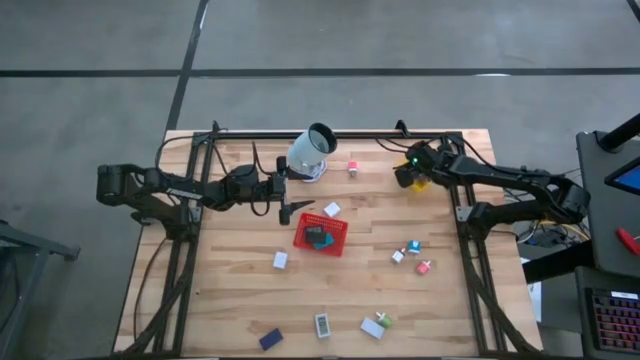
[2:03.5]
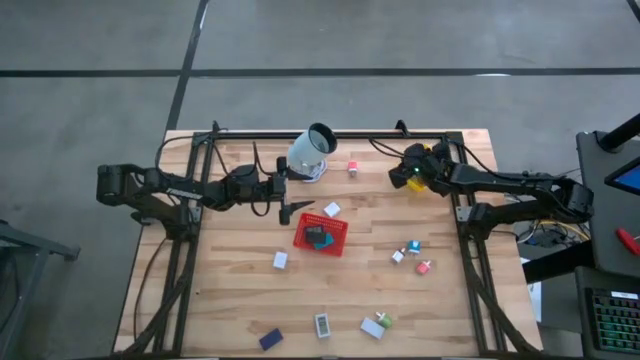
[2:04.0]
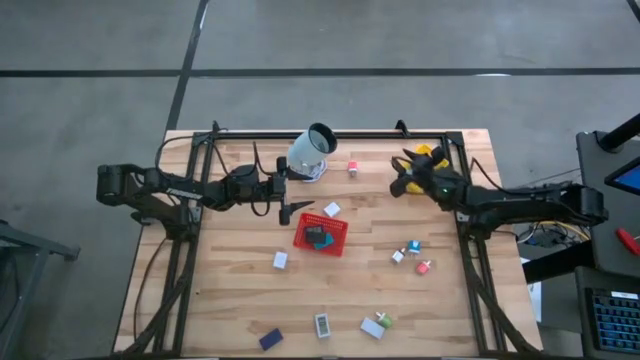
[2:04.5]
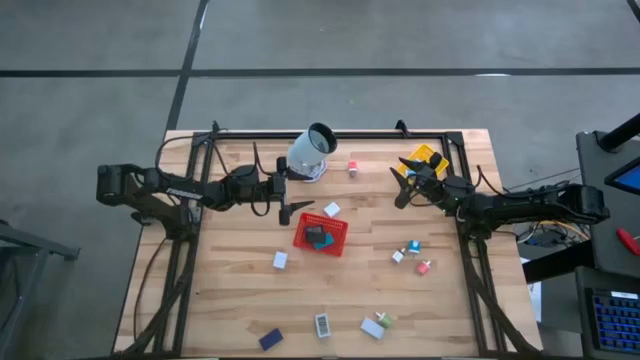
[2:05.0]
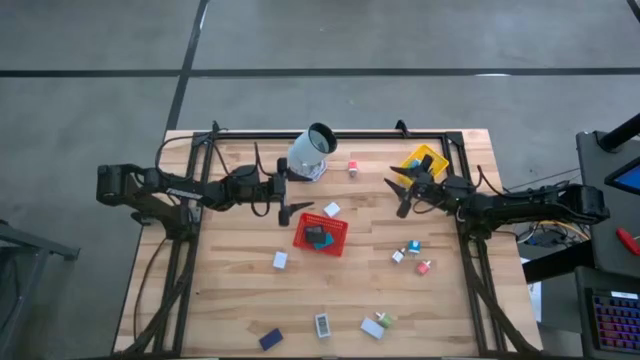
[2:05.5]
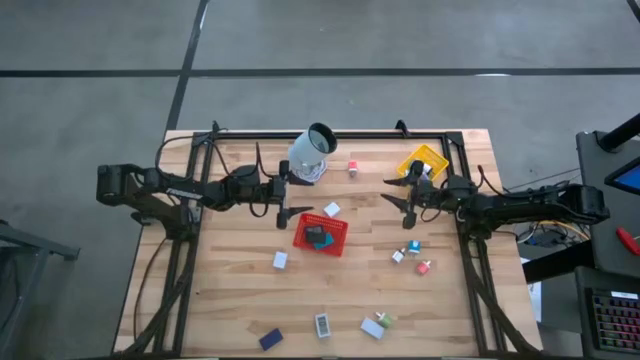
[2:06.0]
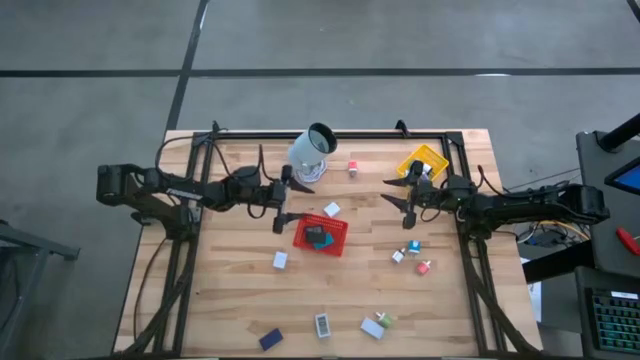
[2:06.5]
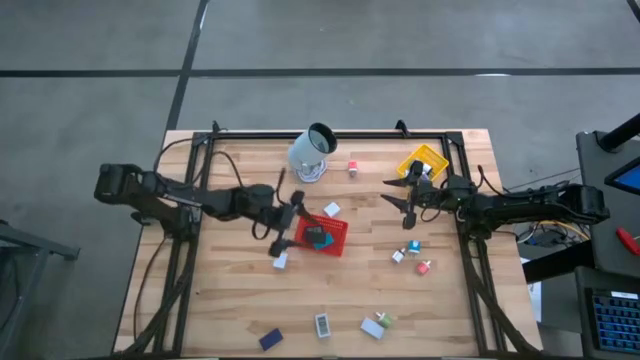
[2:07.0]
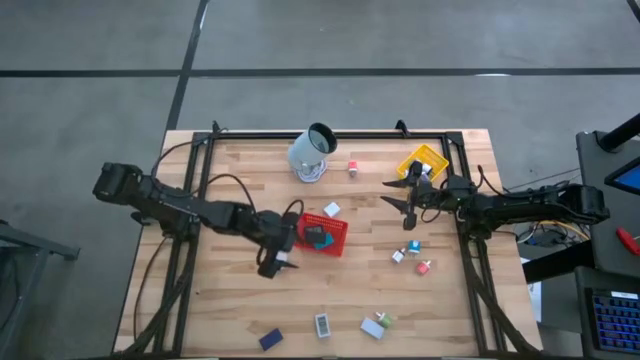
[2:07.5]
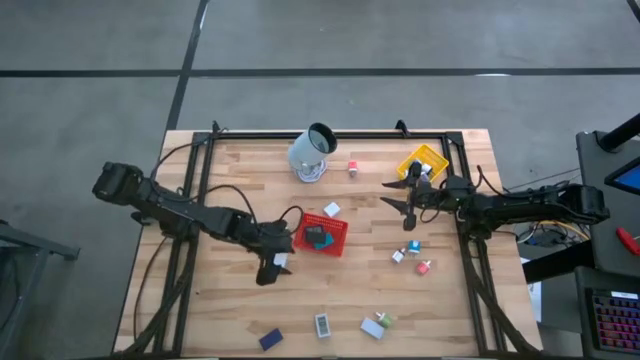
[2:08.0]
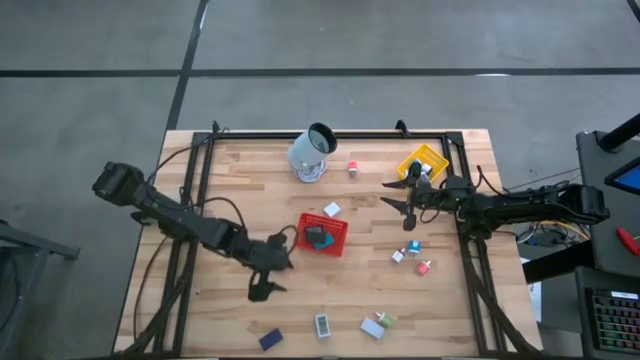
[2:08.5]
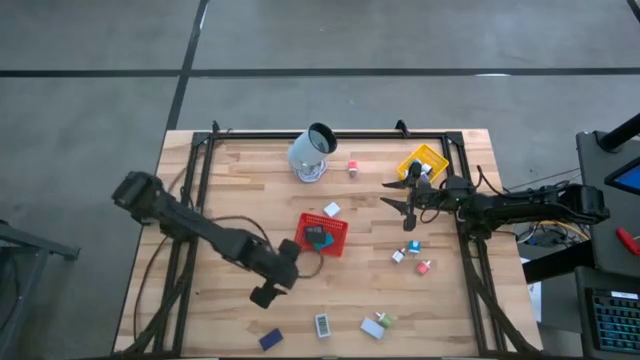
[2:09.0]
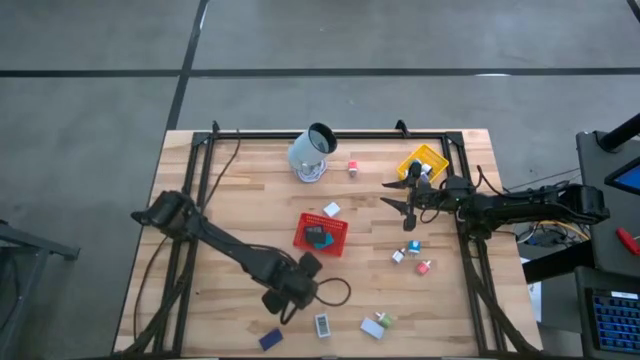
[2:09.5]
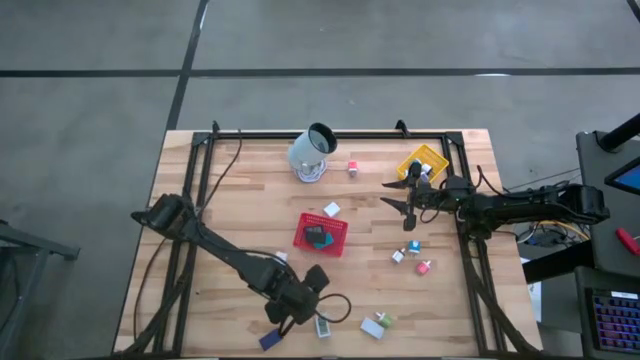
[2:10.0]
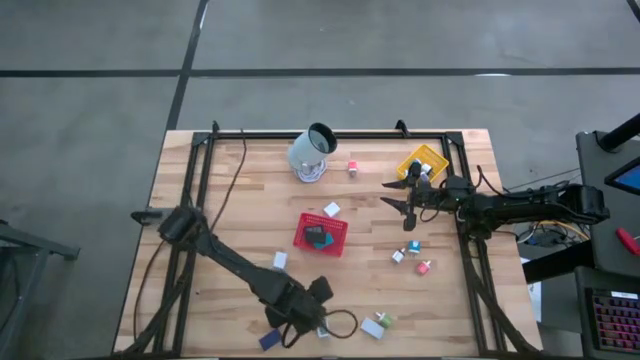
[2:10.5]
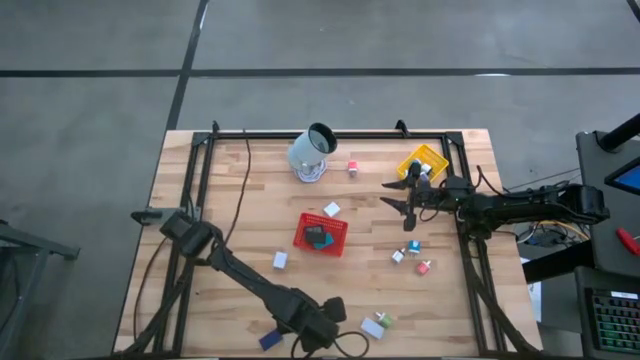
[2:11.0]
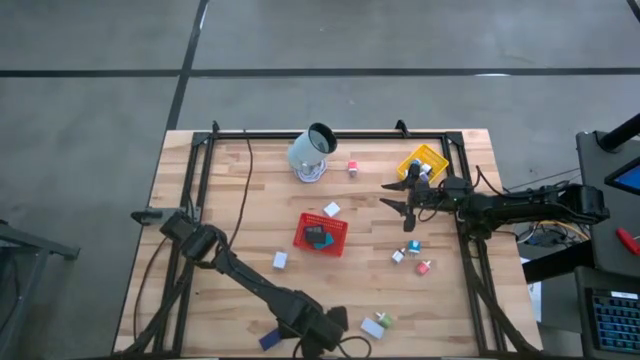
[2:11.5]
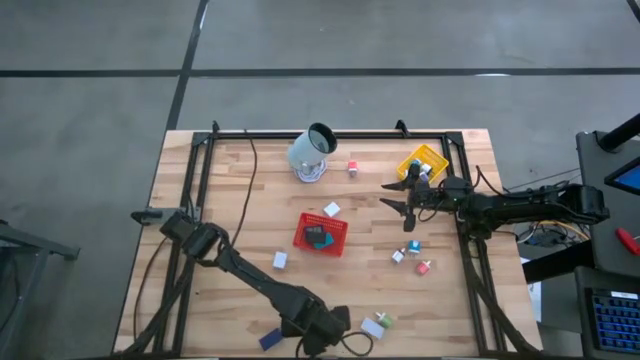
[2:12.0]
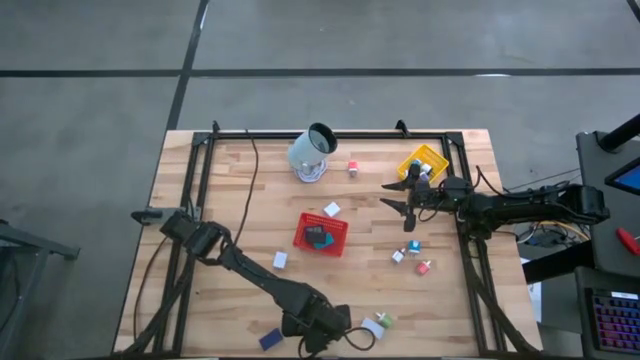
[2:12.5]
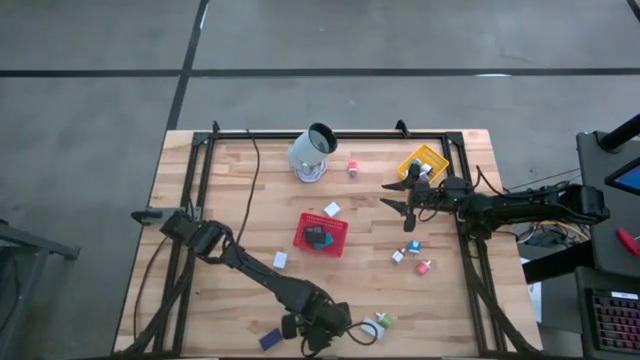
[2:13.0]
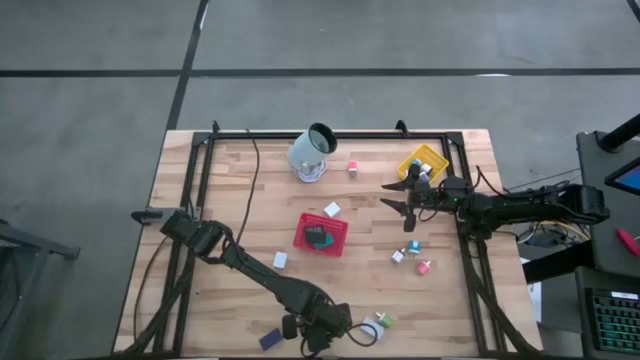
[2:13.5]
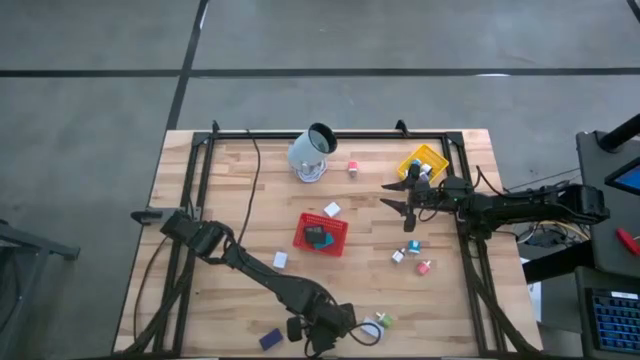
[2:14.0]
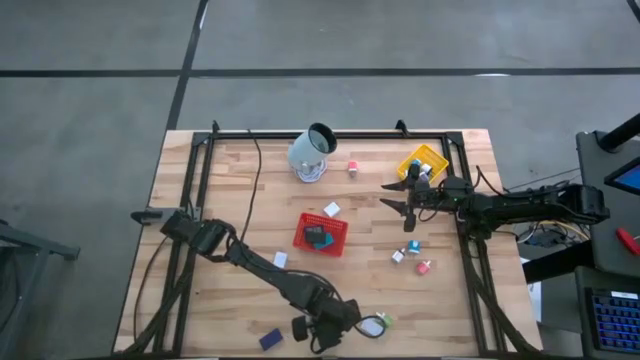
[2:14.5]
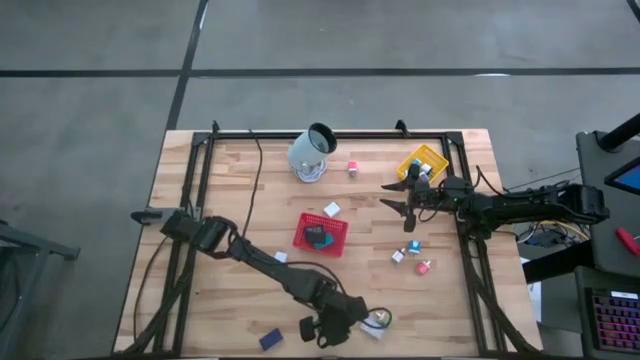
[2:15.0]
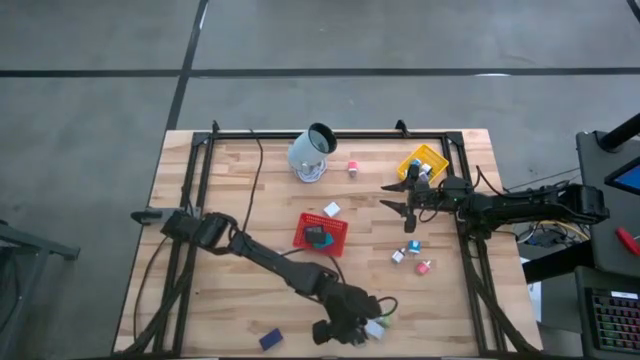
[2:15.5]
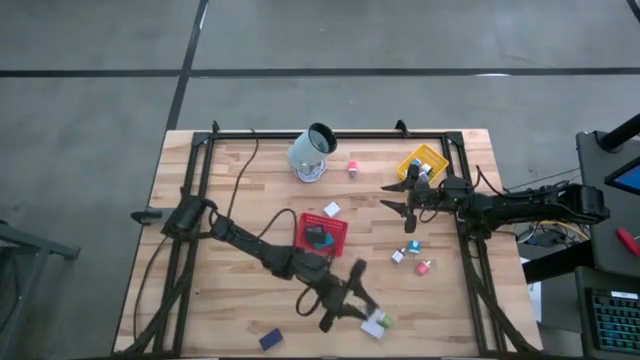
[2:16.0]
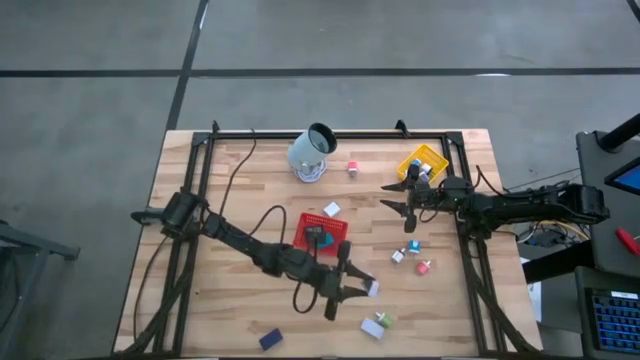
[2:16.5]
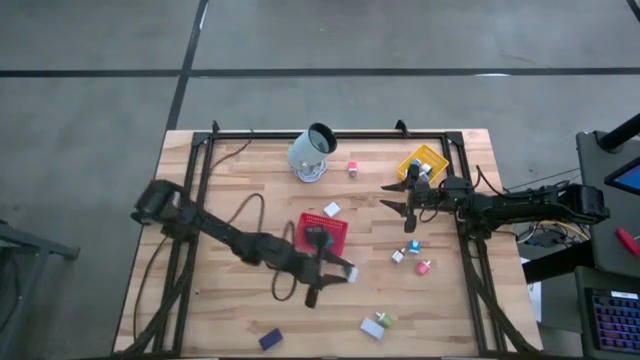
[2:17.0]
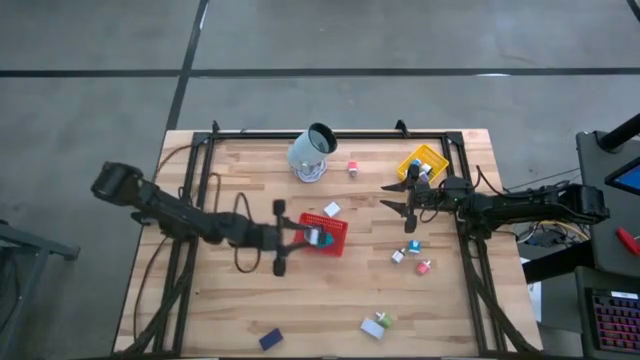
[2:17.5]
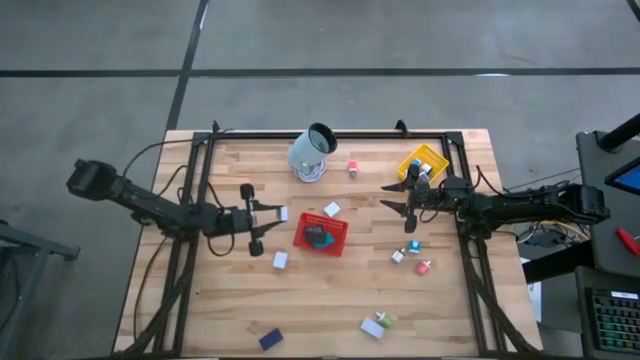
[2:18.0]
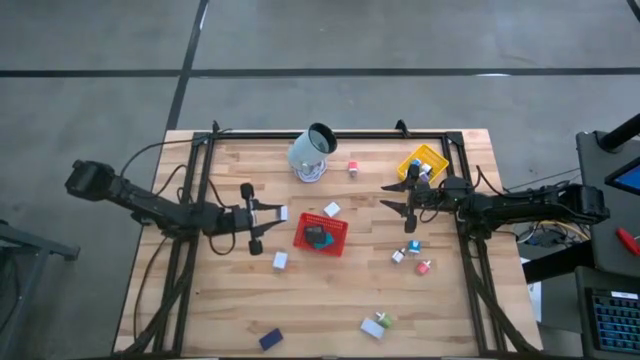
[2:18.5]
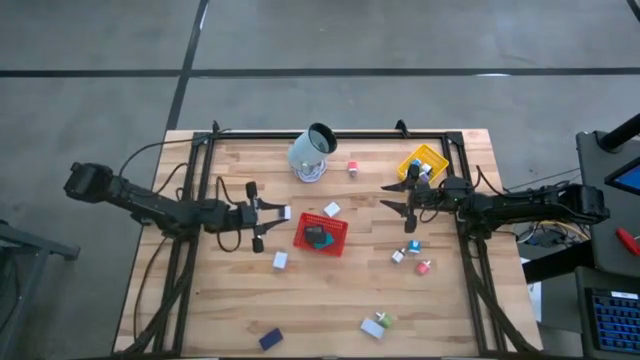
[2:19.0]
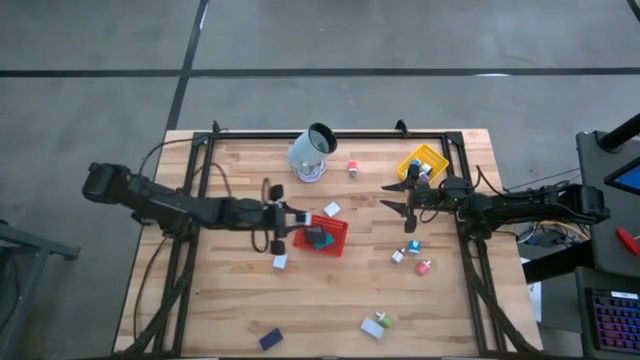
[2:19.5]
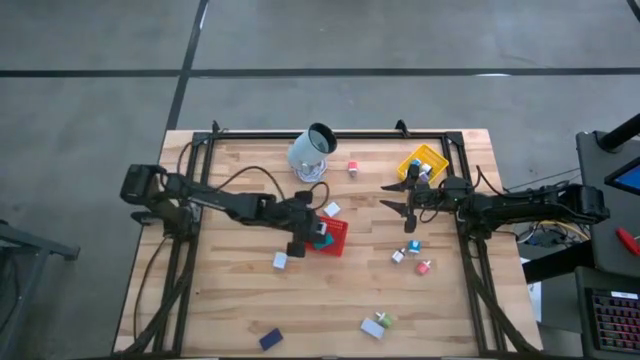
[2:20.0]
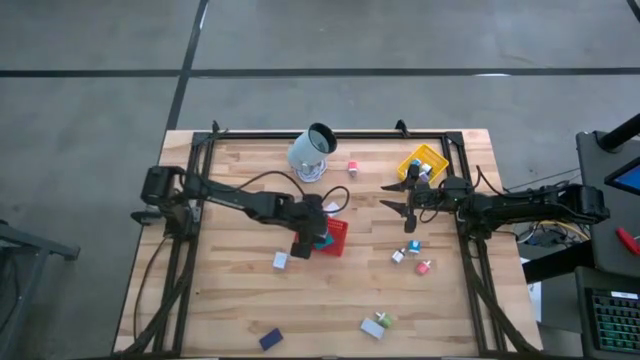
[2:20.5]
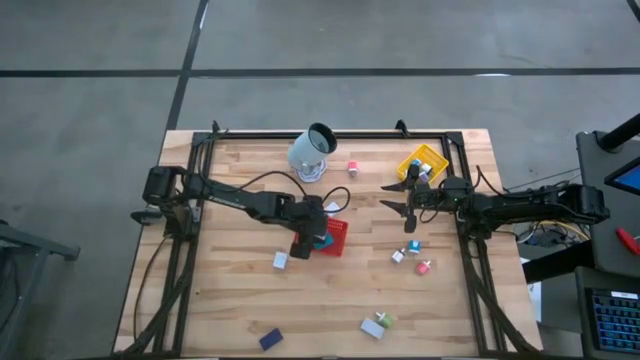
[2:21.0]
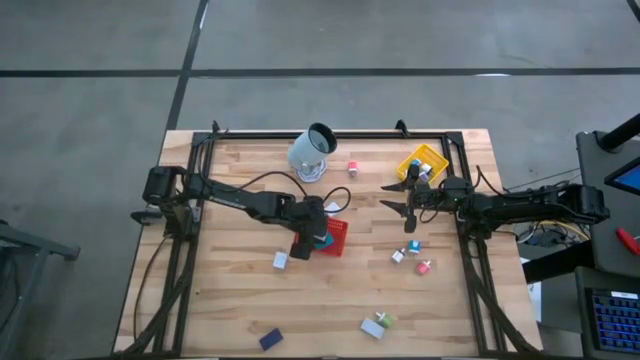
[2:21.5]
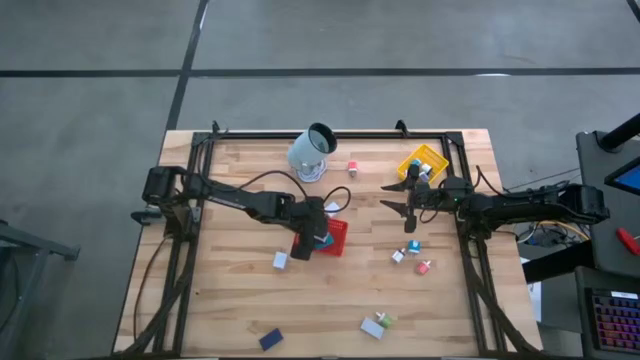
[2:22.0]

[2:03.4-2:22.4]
Task: Pick & Place Office items
Put the left white digital clock into the red basket

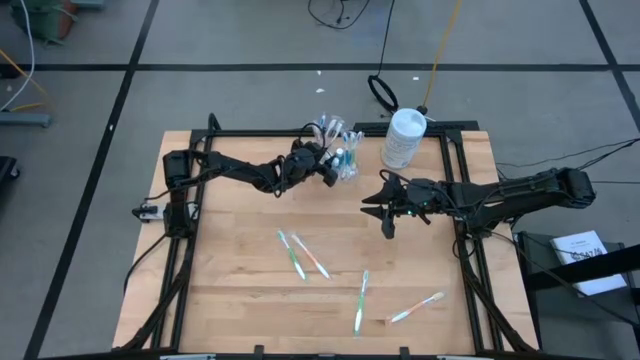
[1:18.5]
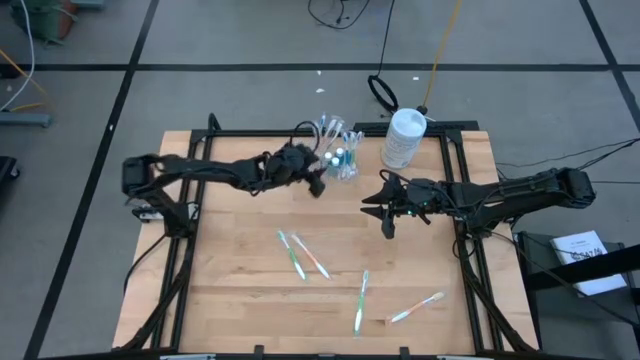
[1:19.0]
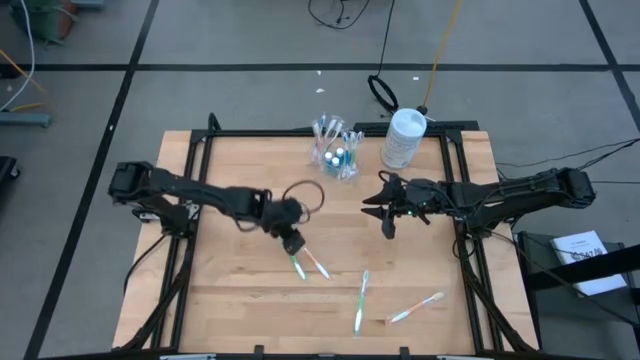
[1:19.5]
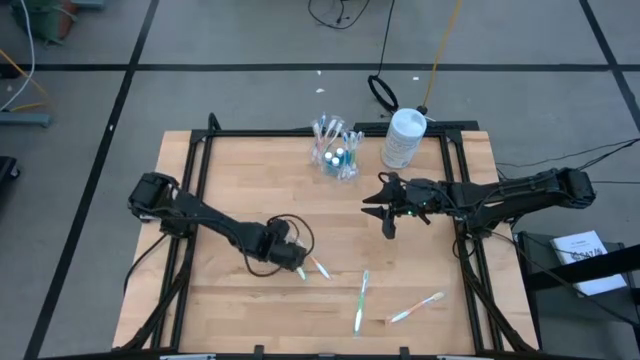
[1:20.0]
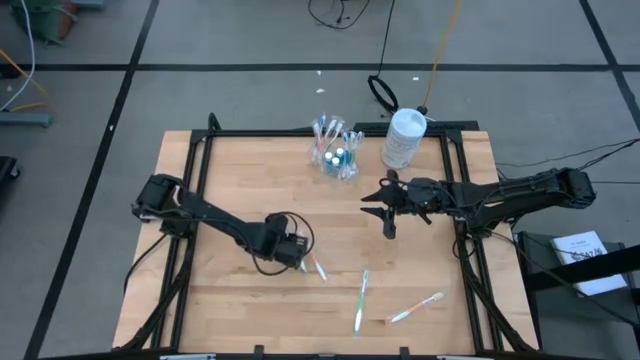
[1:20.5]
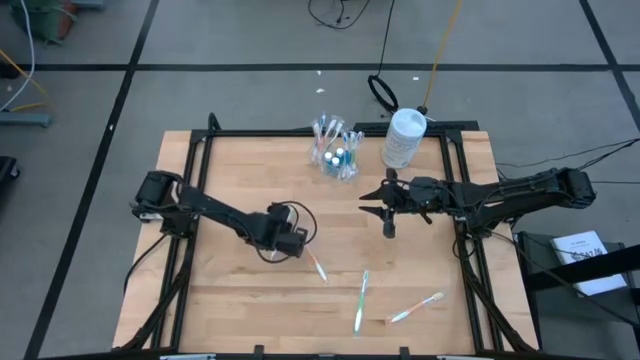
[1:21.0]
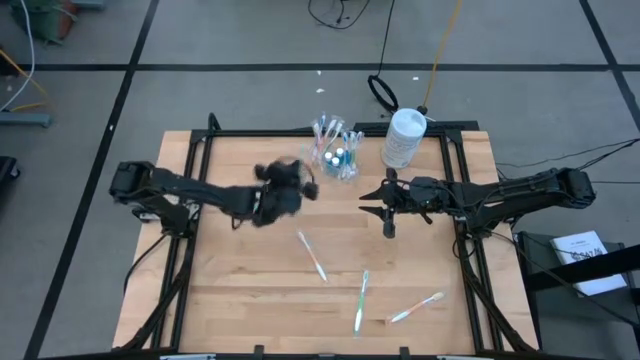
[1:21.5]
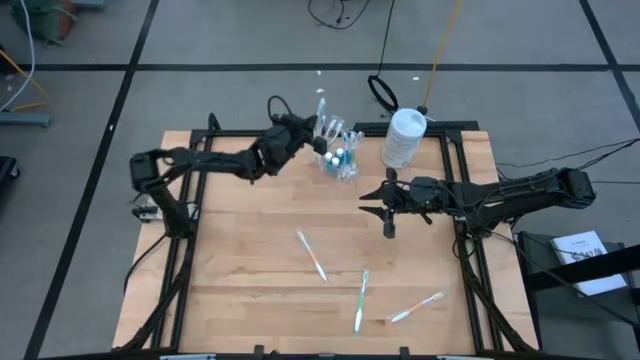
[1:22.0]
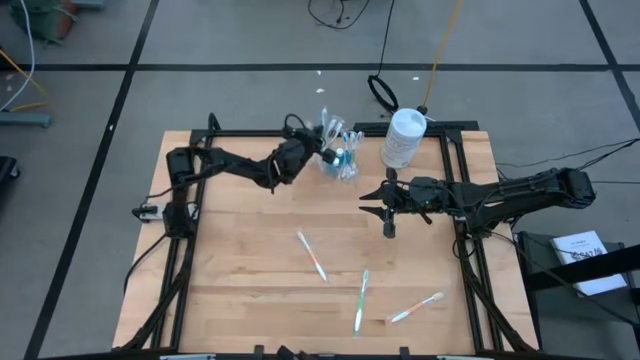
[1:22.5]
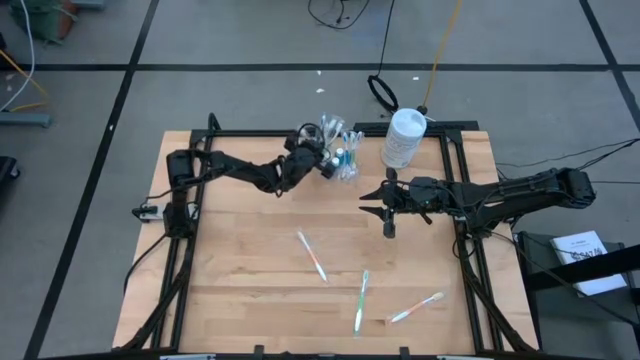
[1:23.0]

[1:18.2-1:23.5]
Task: Pick & Place toothbrushing station
Put the green toothbrush into the transparent organizer
